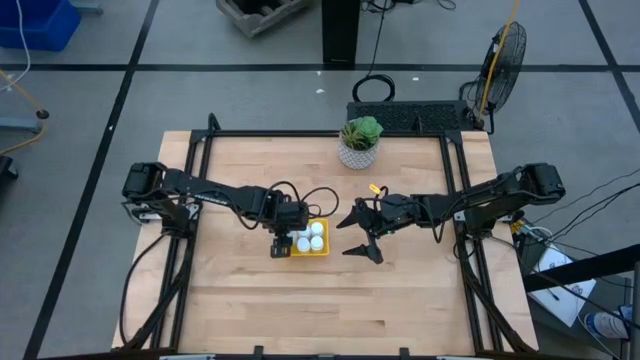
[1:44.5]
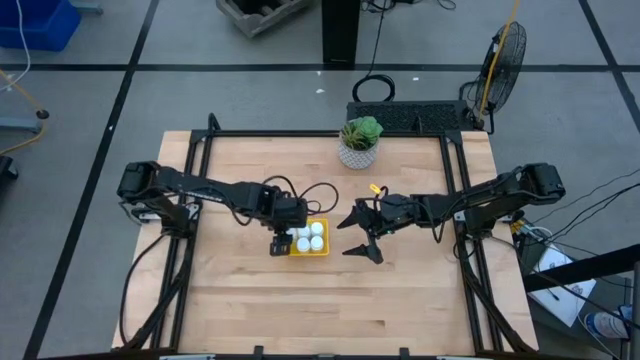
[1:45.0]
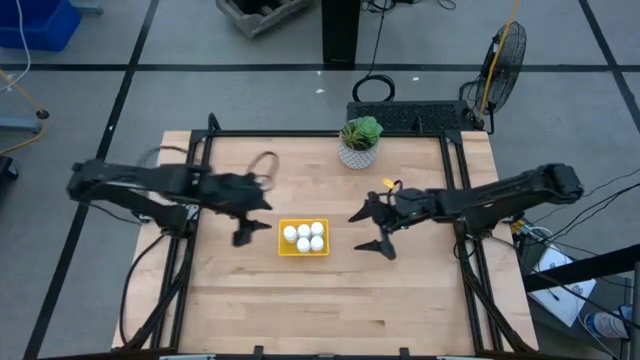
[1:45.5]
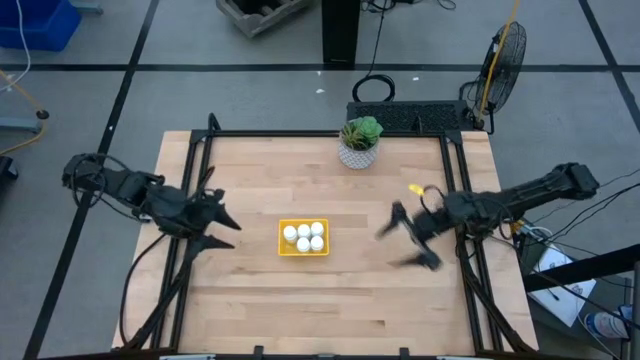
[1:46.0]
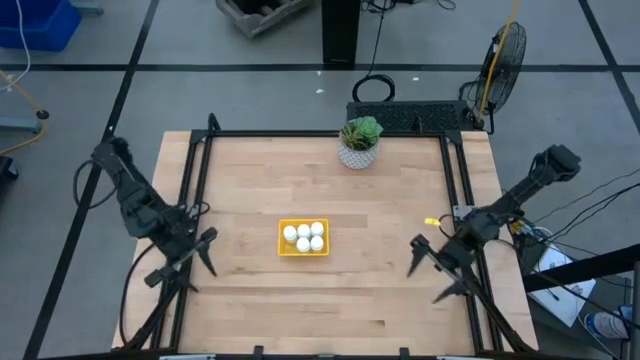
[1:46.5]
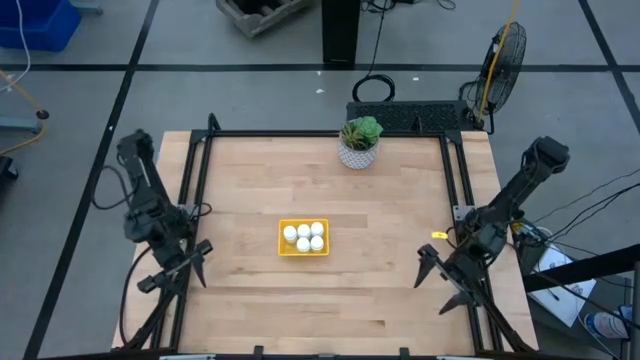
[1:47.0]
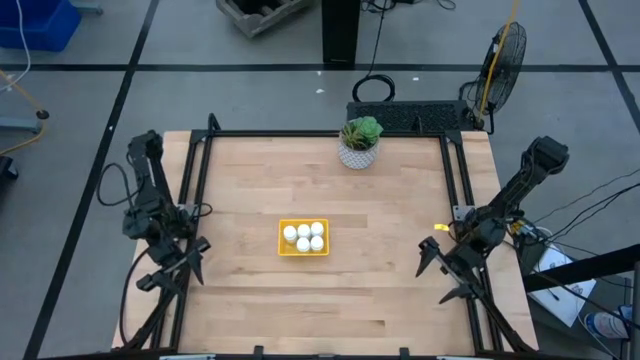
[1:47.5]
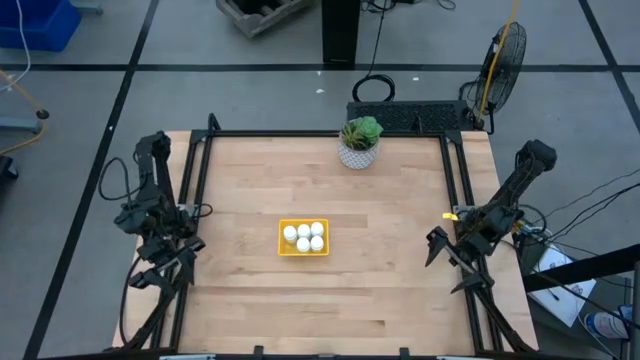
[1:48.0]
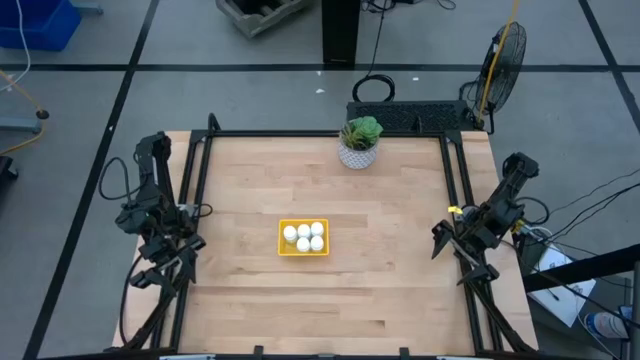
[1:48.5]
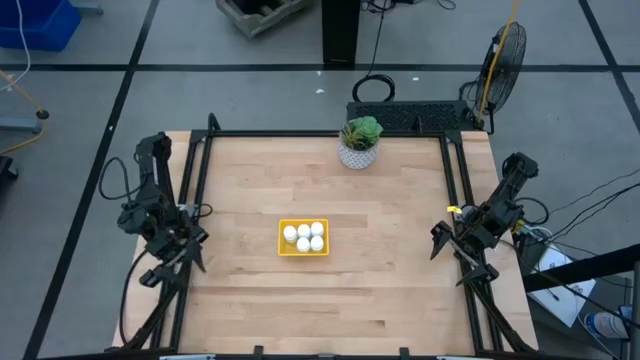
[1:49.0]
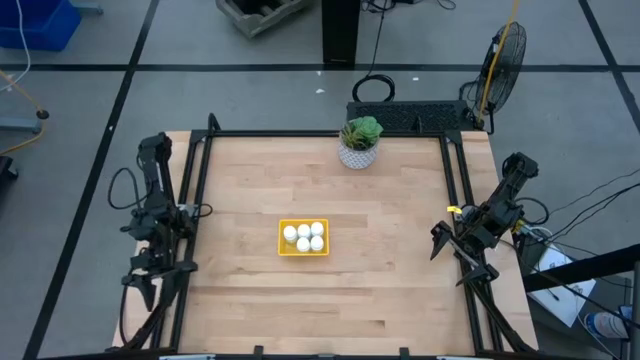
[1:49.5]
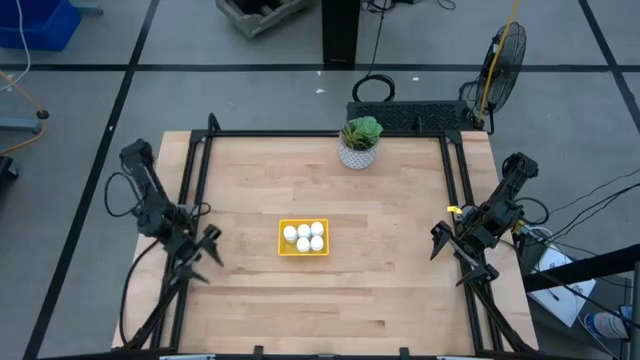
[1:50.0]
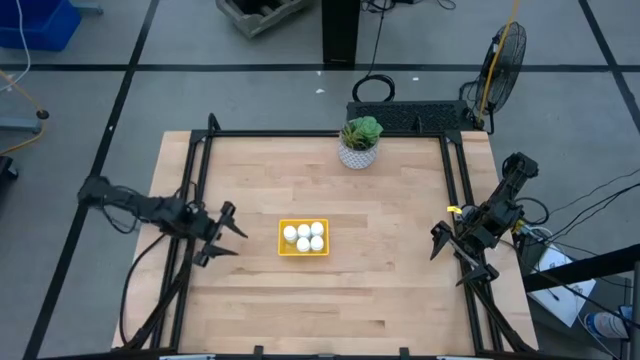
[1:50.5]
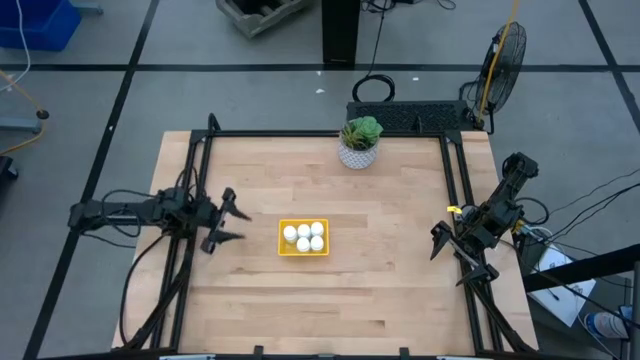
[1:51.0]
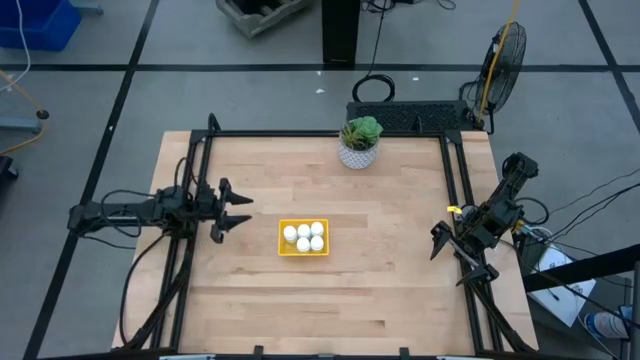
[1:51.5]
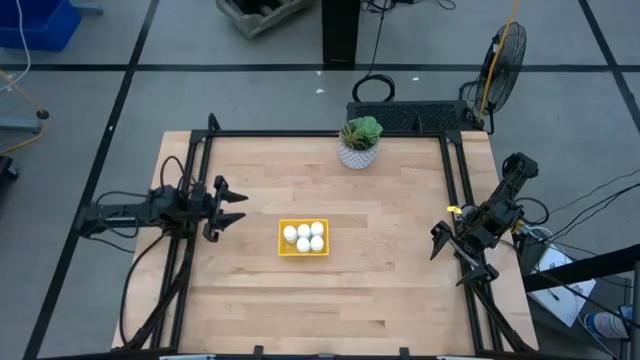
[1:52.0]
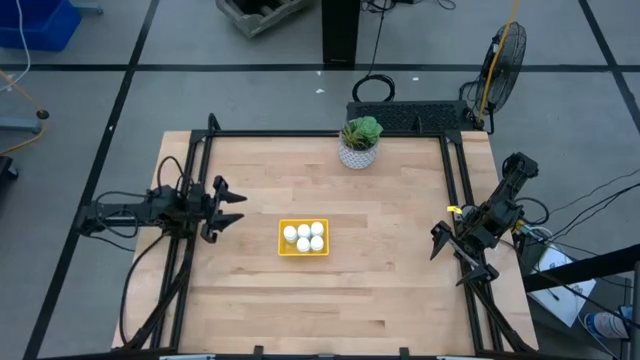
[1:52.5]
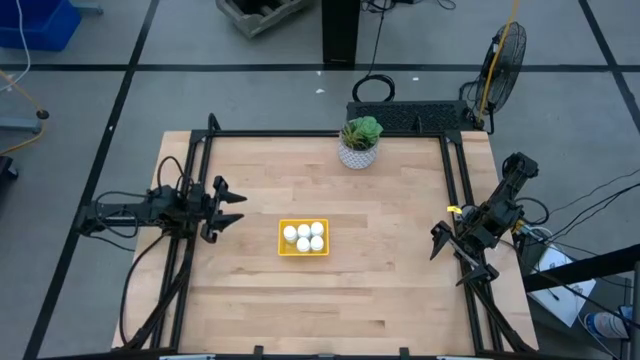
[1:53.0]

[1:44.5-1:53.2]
Task: Pick and place pill bottles into a basket
Return to Home Position

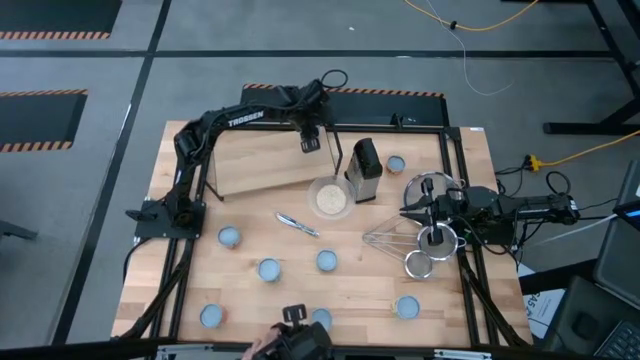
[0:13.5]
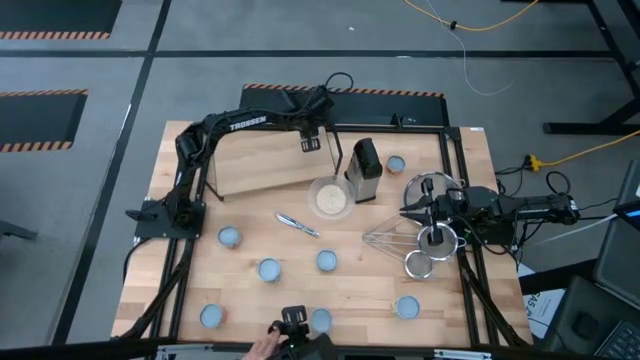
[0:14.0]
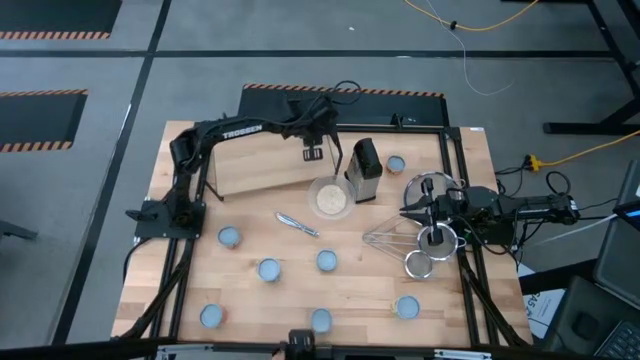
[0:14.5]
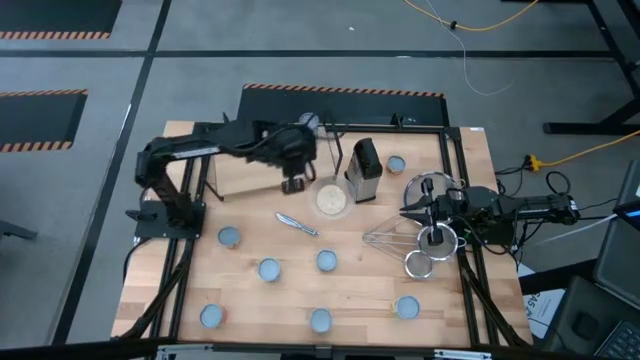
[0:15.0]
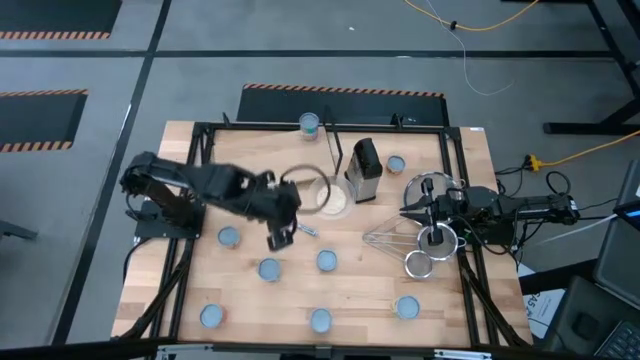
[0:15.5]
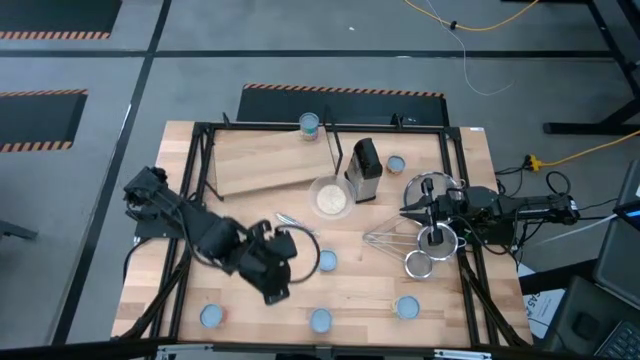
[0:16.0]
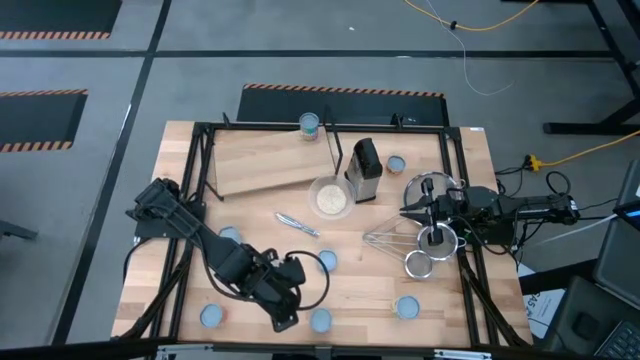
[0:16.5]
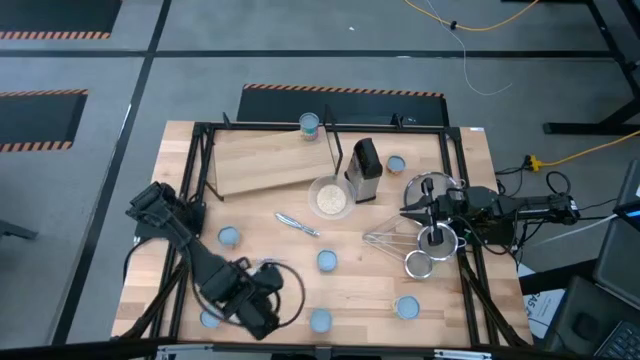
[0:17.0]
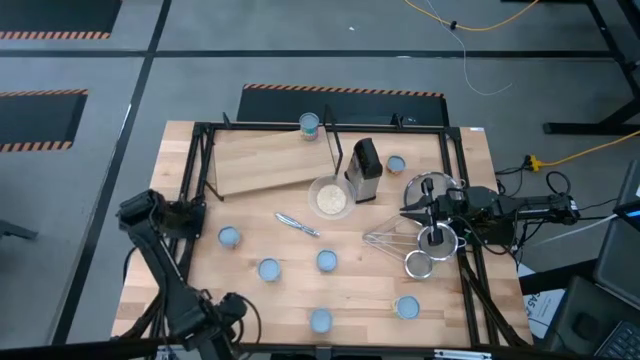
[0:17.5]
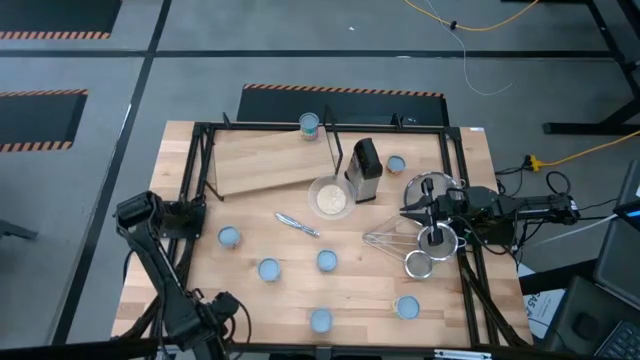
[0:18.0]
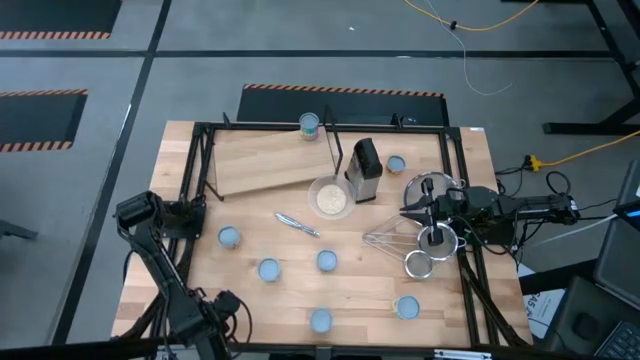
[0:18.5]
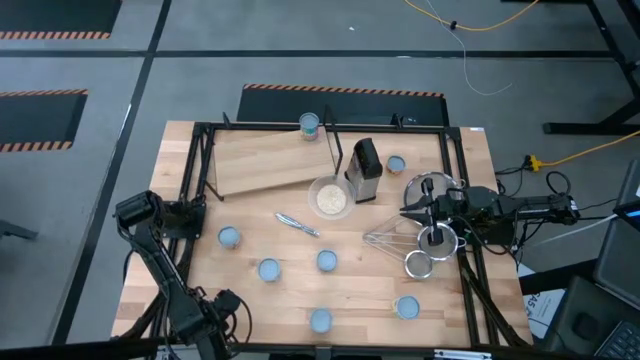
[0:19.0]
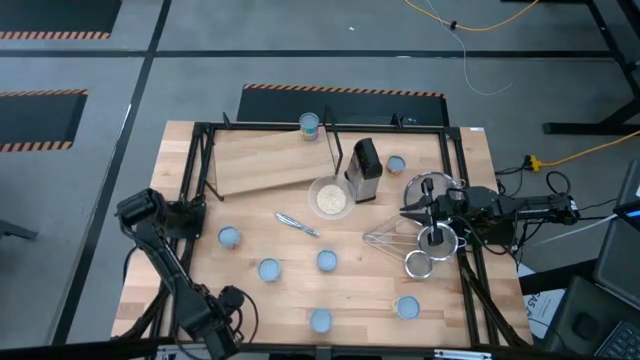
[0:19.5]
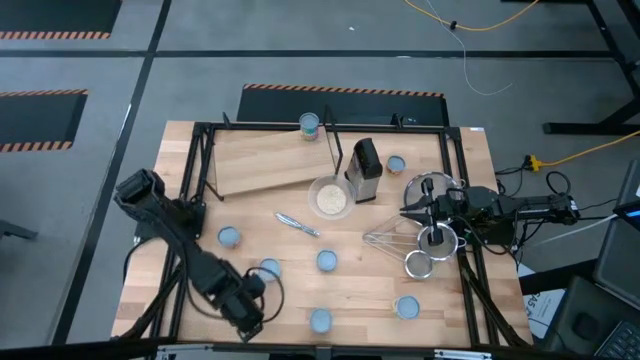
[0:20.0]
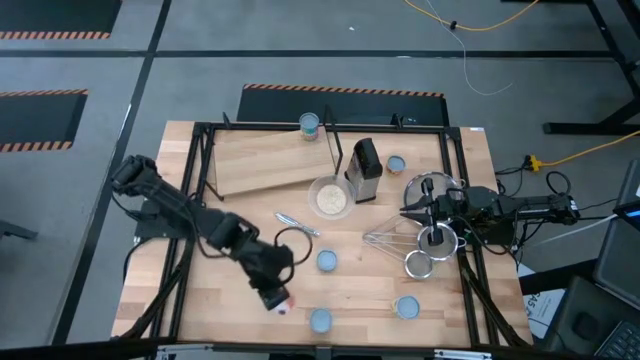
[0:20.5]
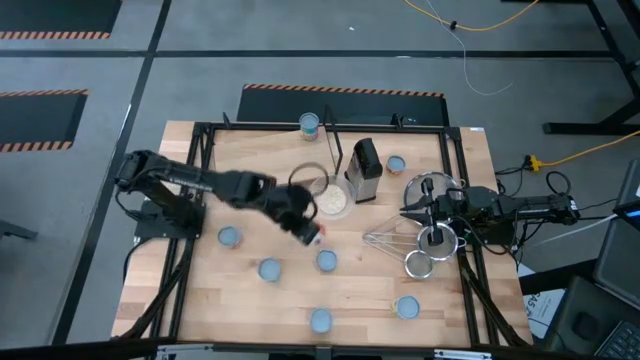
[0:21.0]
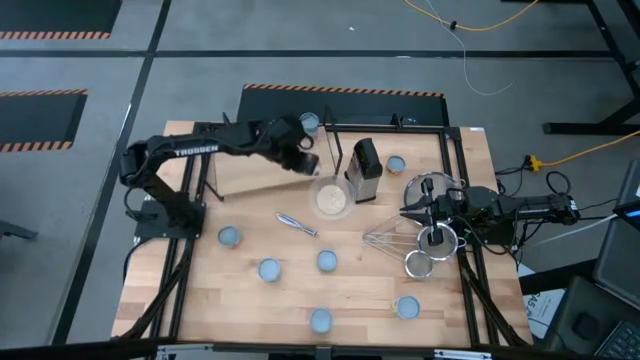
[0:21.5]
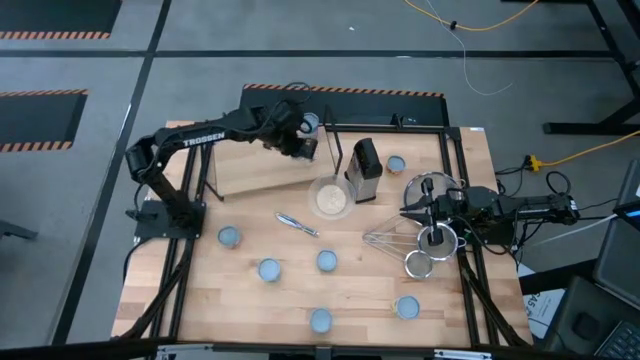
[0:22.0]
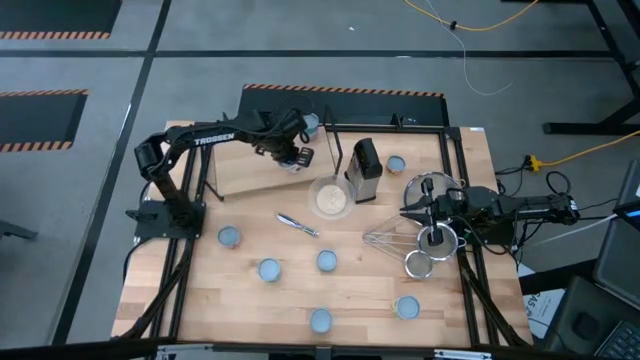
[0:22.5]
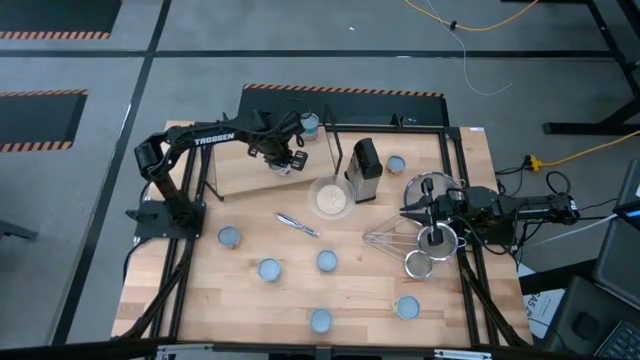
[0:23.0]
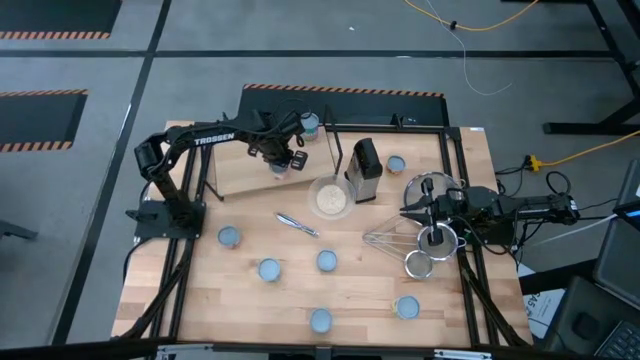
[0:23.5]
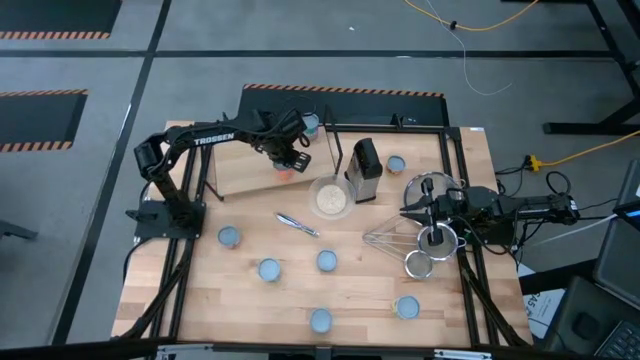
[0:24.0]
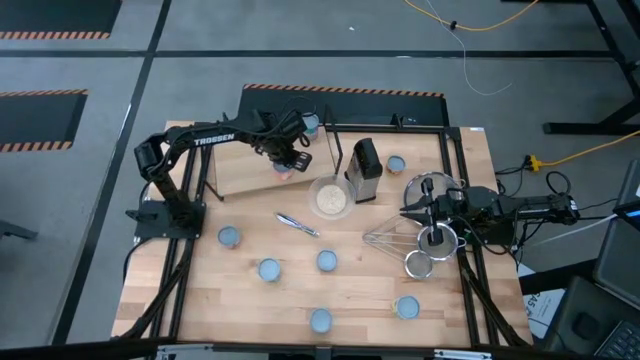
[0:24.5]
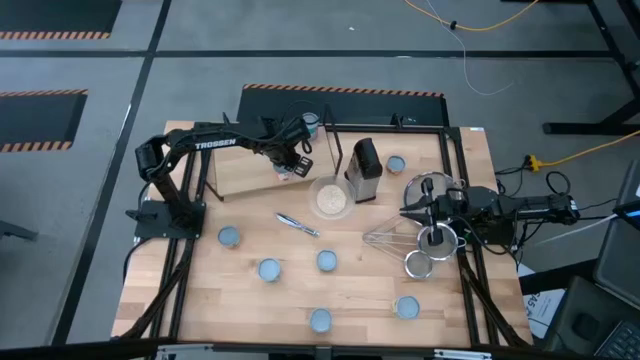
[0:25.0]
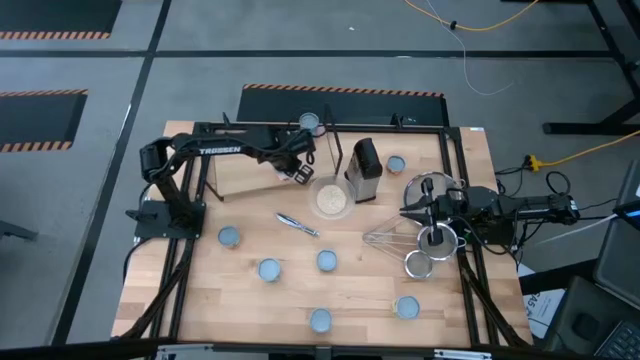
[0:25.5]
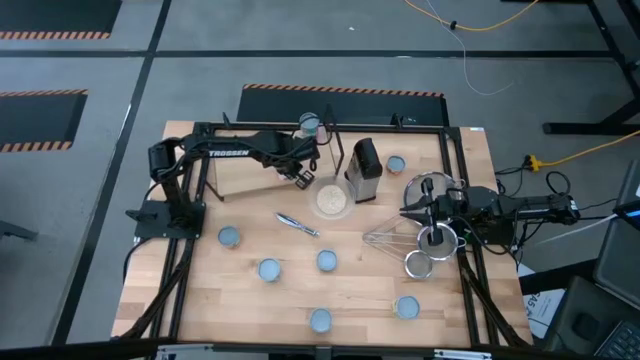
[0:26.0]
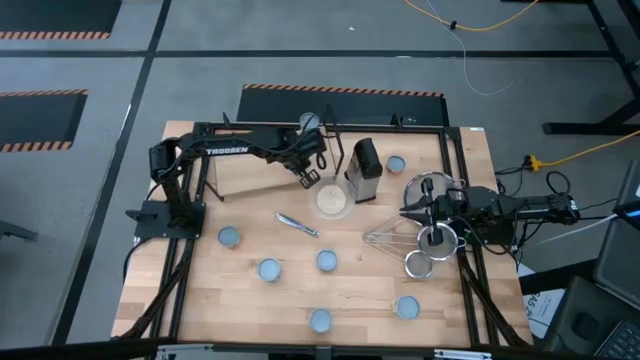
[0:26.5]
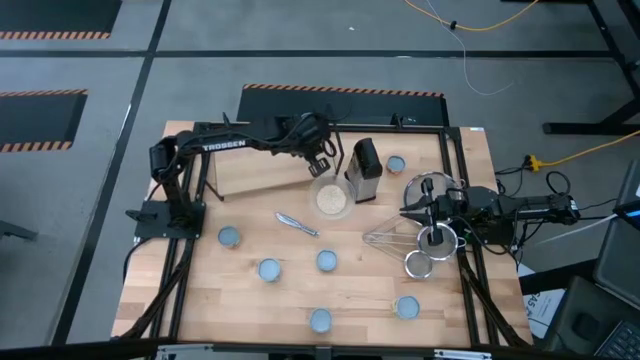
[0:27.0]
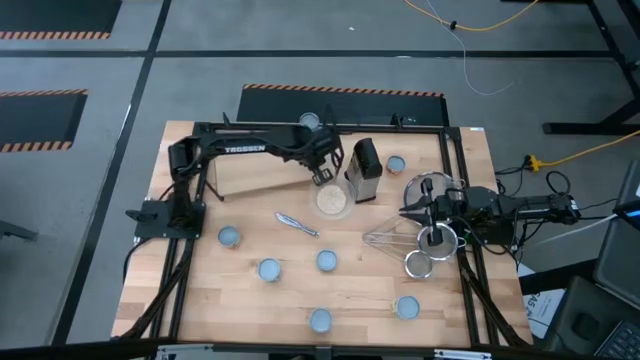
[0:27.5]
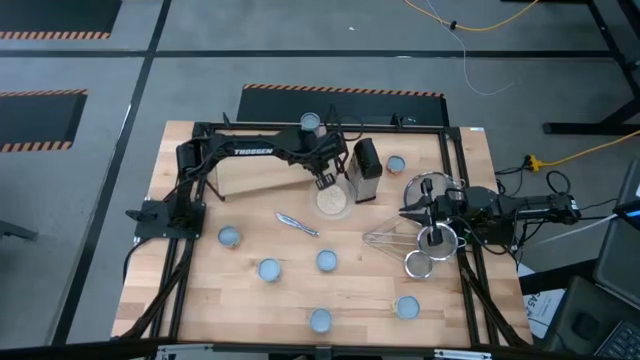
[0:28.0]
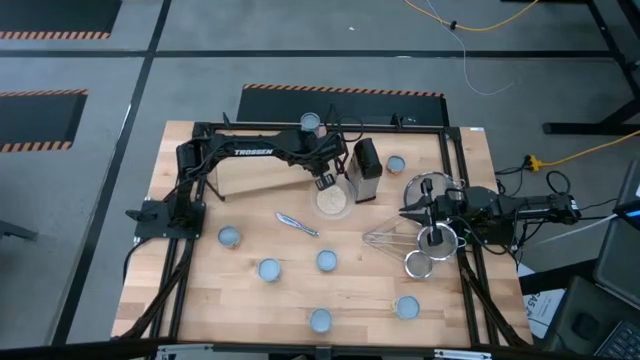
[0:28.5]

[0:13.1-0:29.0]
Task: Pick and place cans onto a shelf
Put the orange can on the shelf aligned with the other green can
